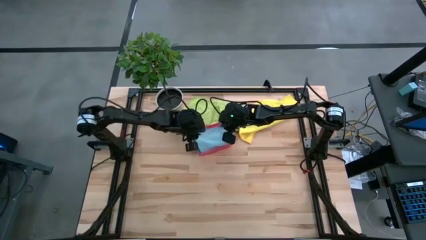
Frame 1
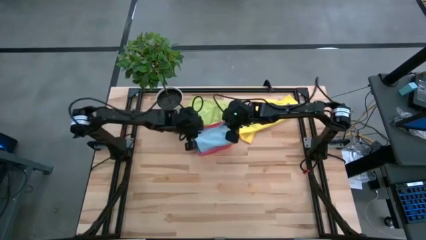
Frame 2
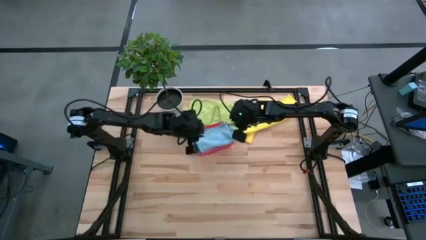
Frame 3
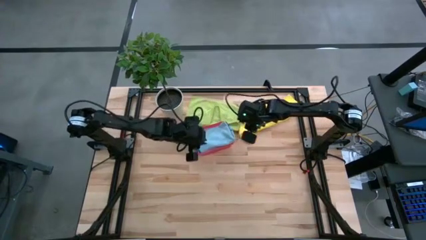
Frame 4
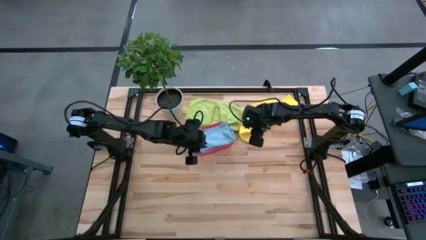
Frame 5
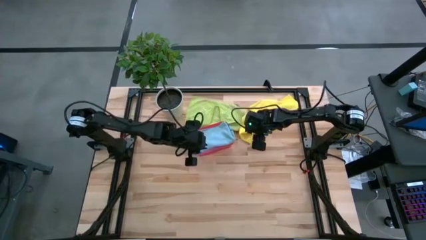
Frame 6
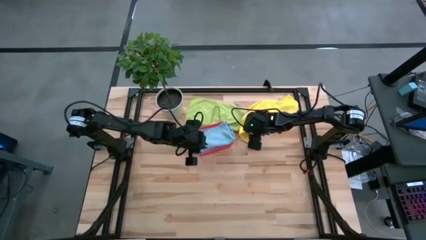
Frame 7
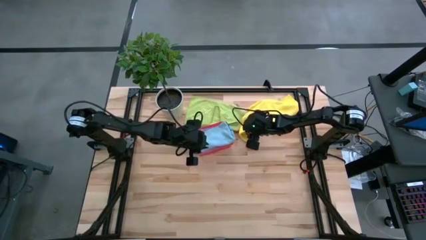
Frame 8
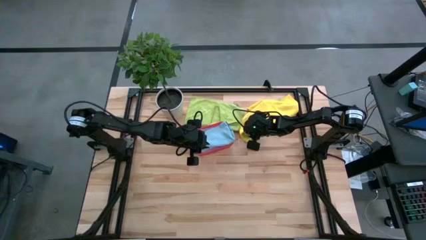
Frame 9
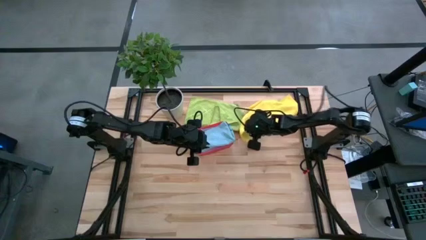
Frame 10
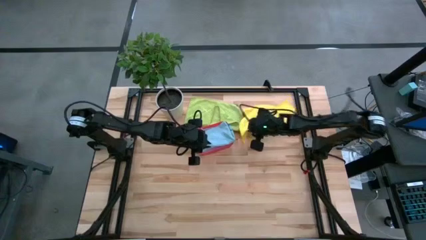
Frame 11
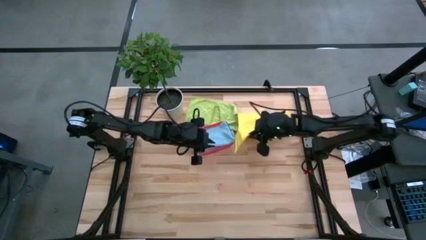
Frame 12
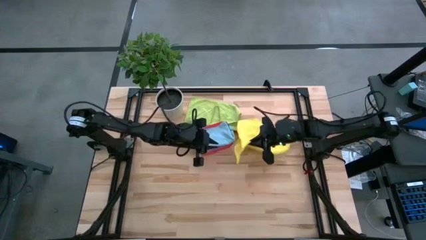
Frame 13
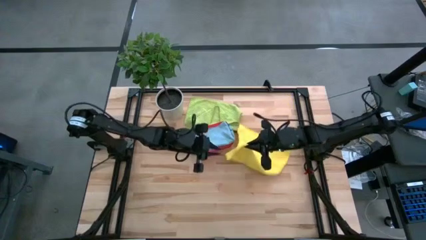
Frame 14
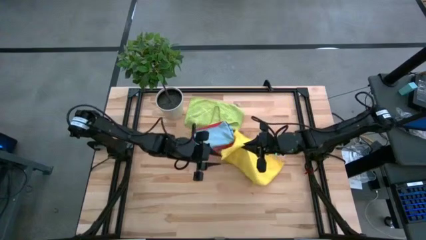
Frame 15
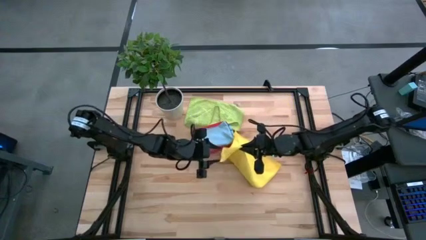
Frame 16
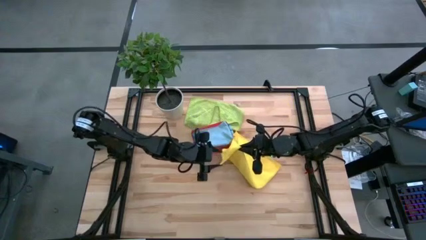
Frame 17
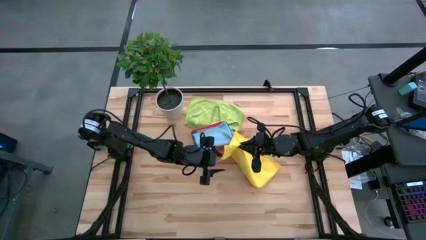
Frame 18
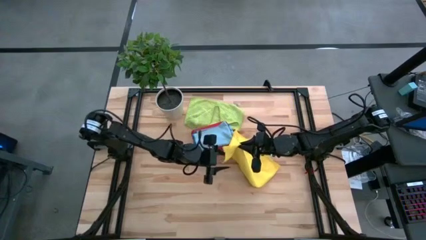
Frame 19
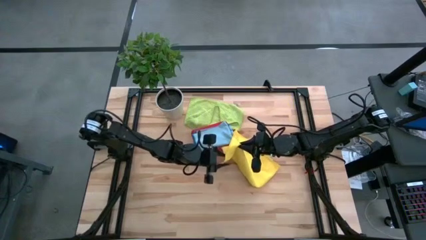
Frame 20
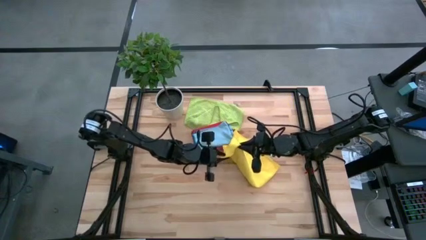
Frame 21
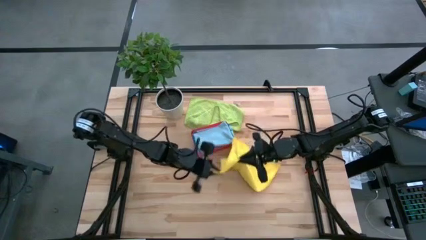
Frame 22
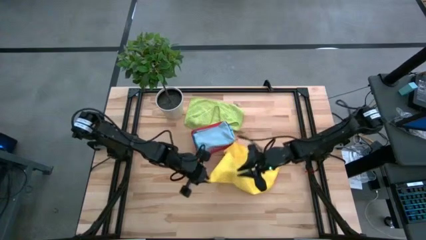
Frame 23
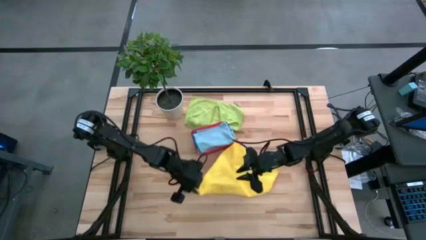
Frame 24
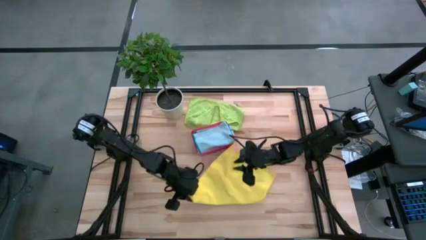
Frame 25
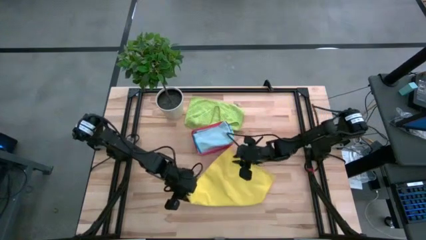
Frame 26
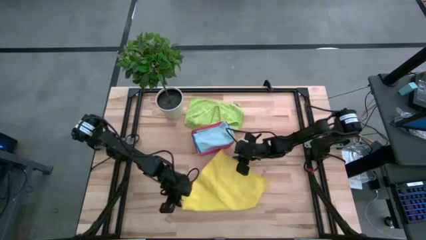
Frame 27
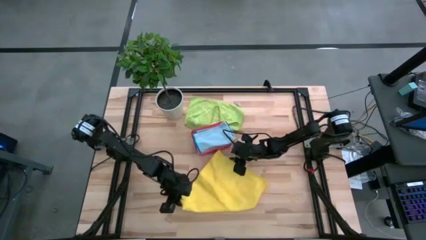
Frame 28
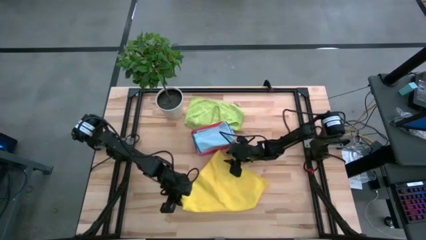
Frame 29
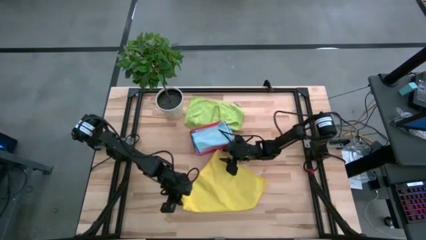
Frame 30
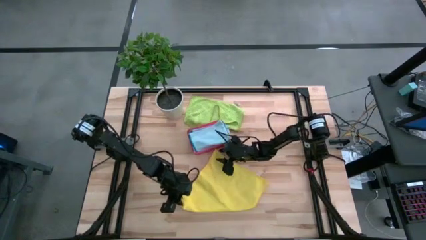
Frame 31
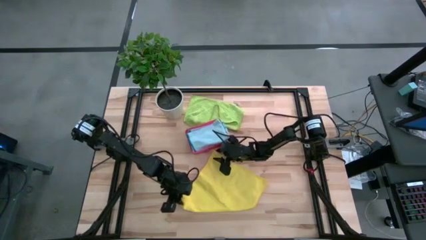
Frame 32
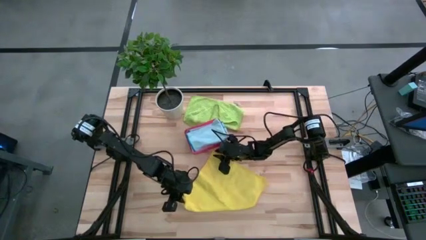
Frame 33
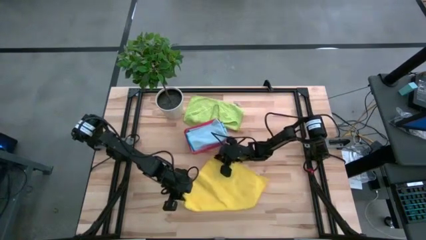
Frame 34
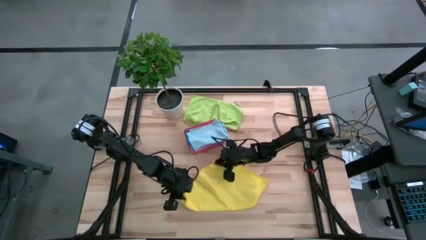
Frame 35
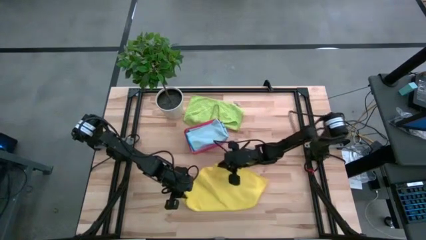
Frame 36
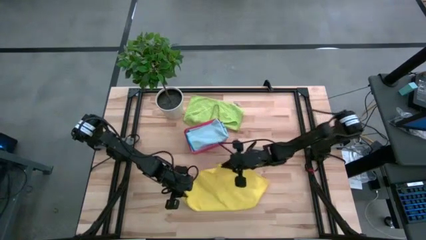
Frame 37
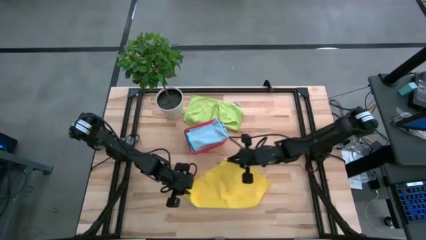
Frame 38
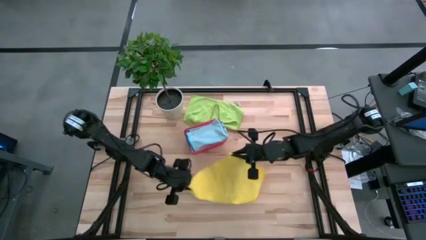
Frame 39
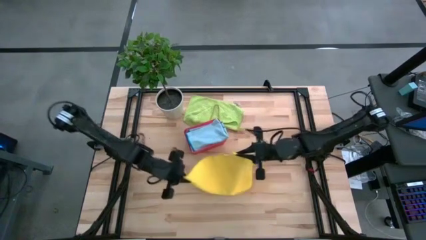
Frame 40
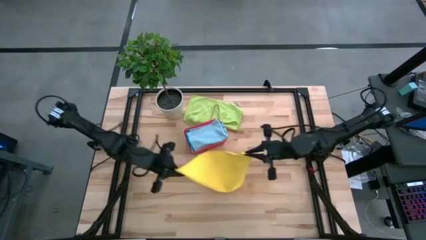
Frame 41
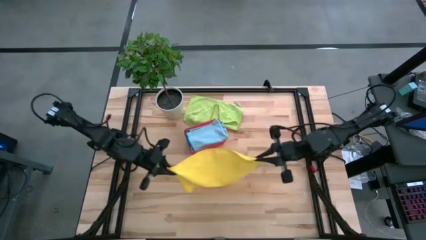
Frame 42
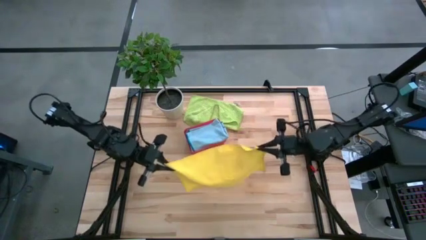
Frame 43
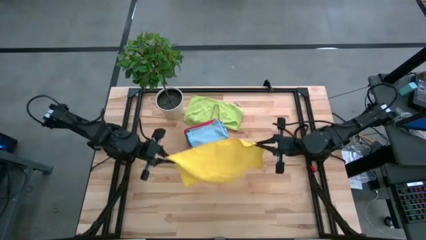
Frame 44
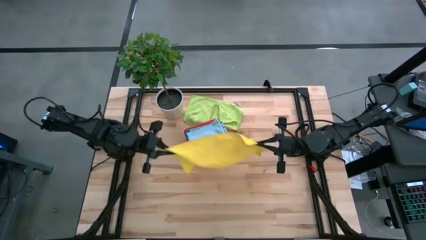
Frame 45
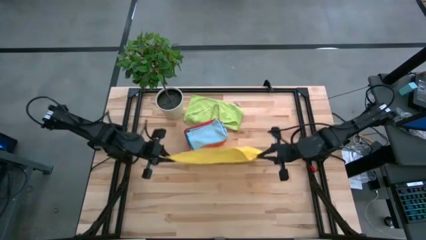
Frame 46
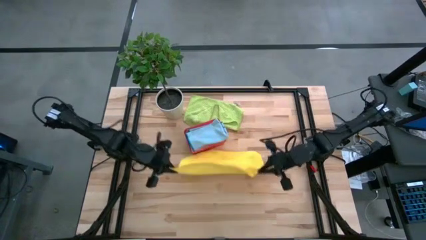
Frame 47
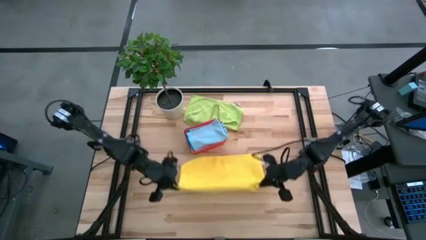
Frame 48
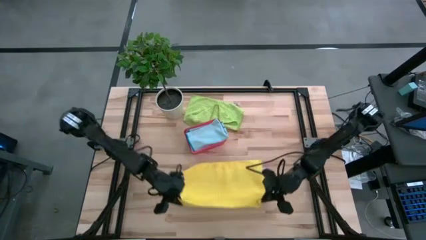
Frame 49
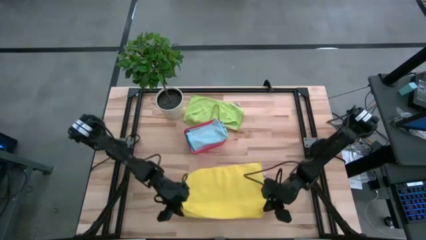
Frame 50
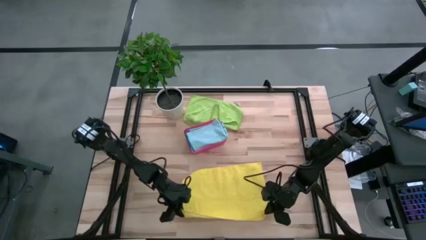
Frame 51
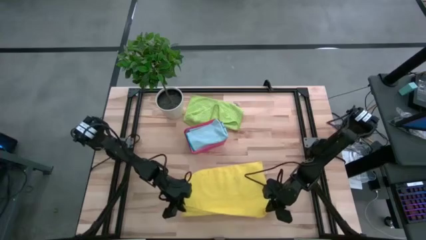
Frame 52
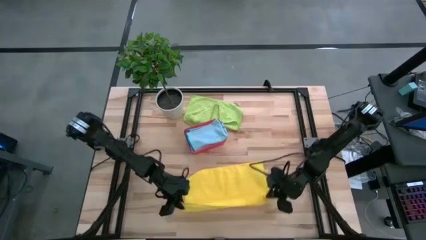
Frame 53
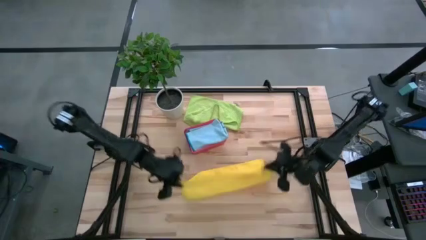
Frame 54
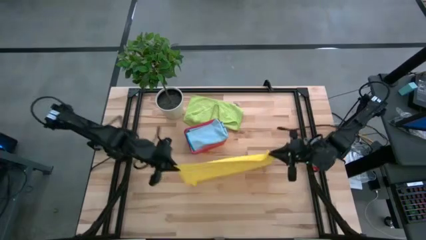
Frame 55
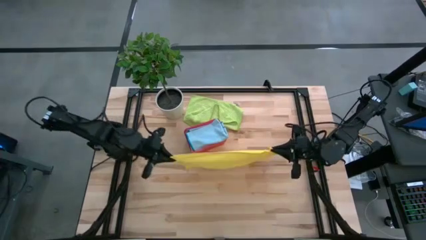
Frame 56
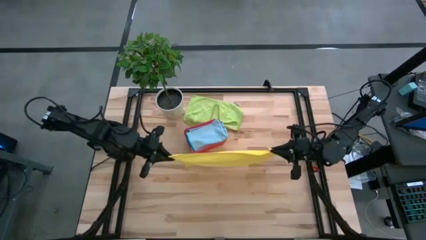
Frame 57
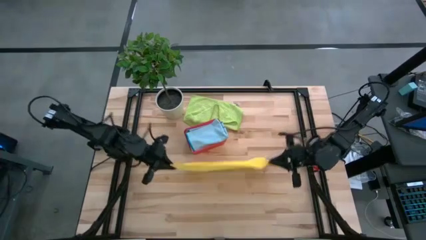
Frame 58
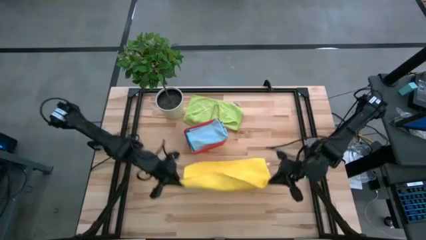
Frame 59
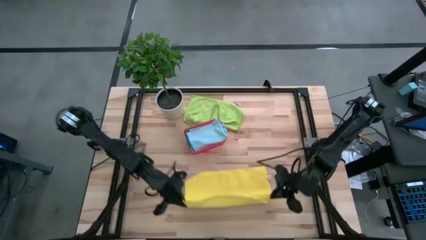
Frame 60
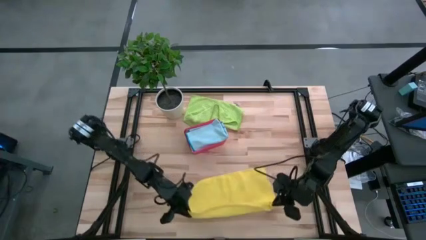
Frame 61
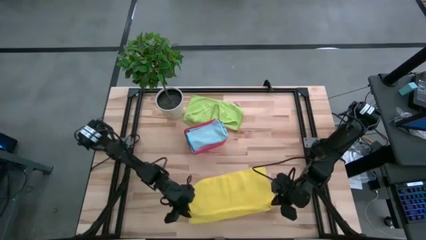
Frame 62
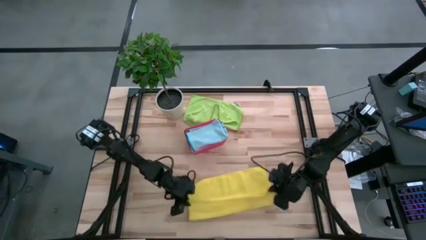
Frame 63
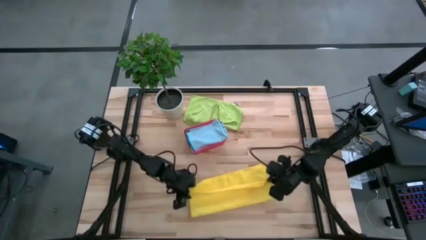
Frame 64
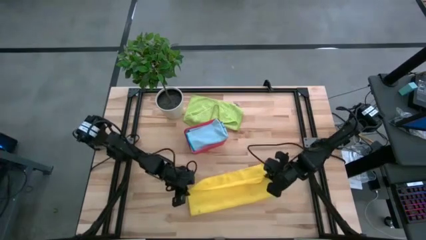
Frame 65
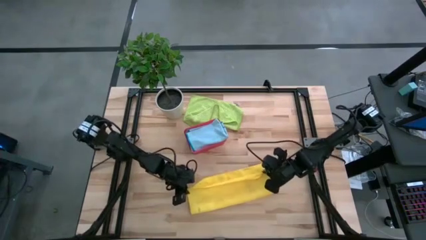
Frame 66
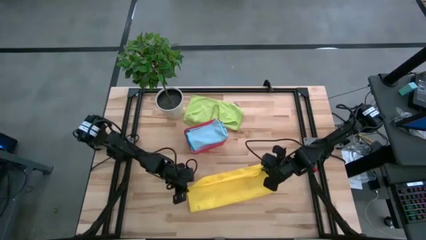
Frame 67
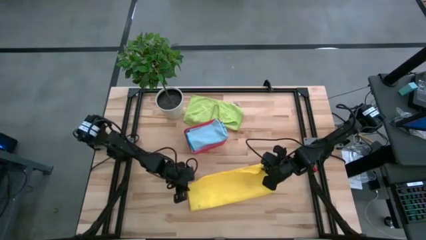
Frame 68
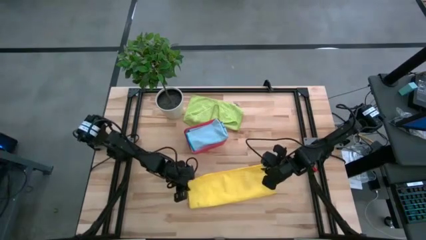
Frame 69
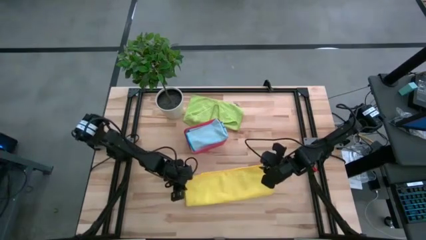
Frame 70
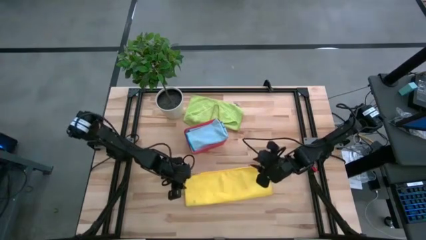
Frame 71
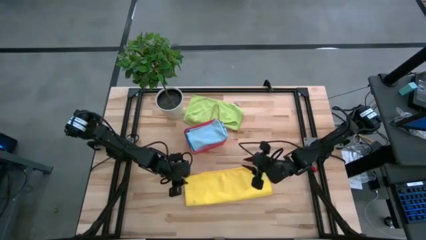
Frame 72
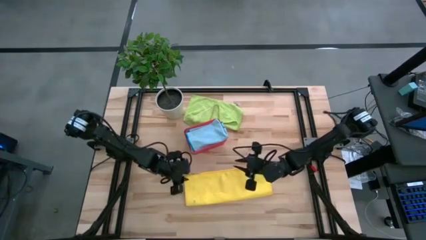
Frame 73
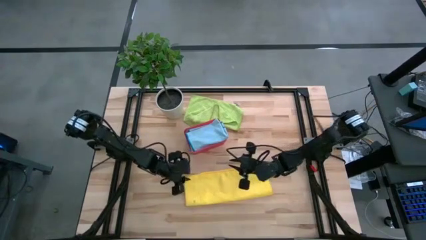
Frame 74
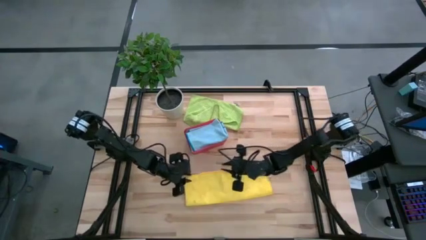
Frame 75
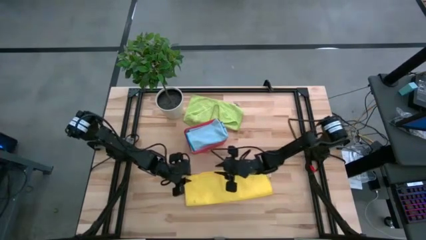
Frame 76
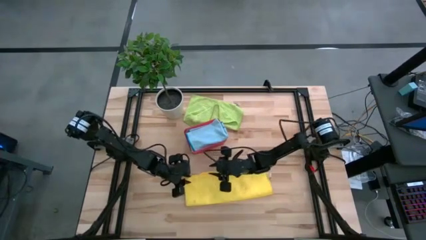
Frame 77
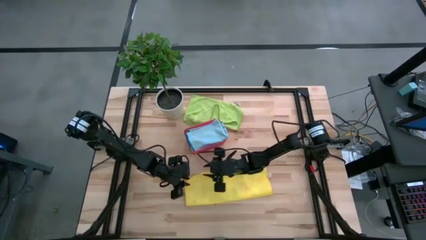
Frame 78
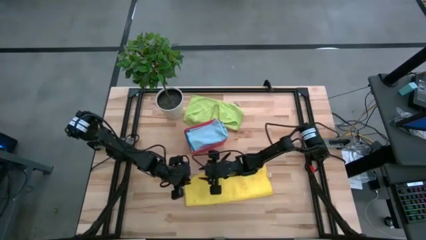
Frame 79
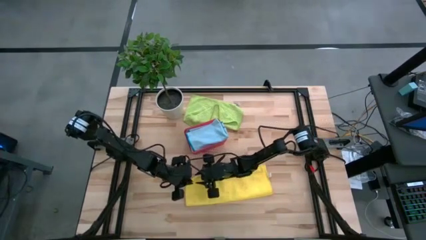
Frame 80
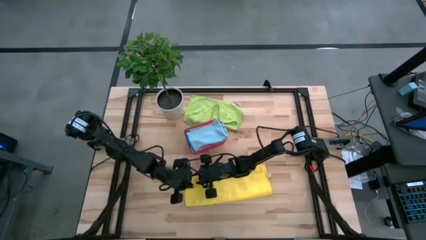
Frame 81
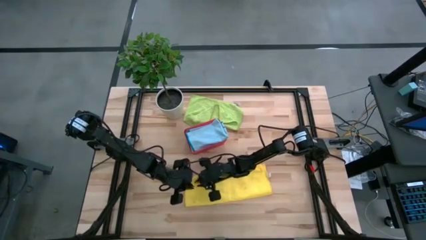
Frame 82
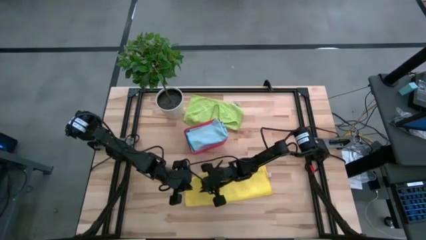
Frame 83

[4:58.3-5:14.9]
Task: Fold microfiber towels
Fold the yellow microfiber cloth
